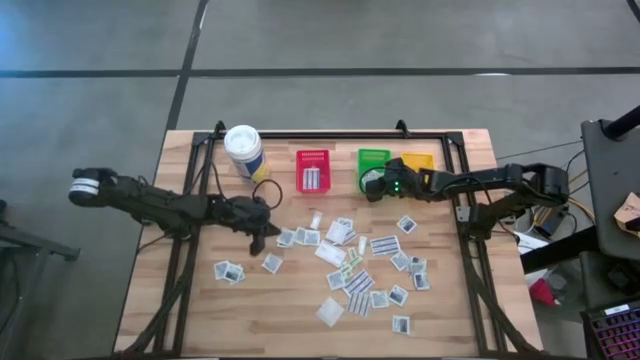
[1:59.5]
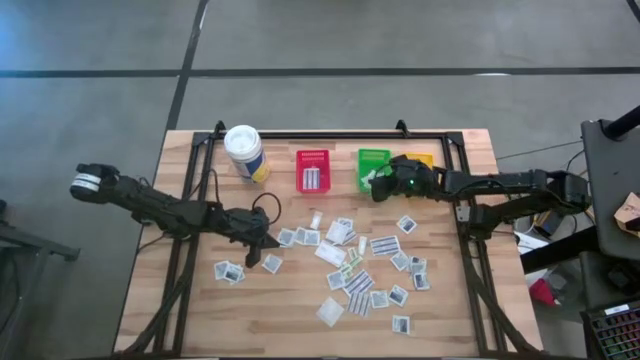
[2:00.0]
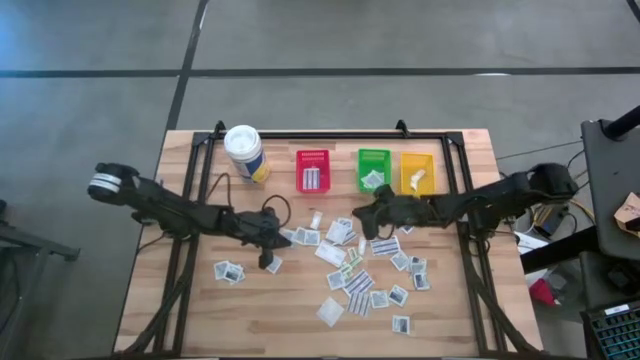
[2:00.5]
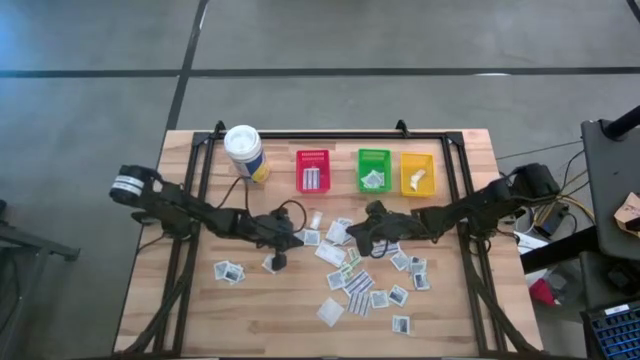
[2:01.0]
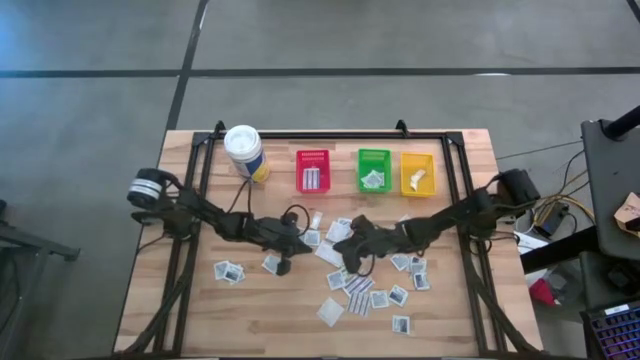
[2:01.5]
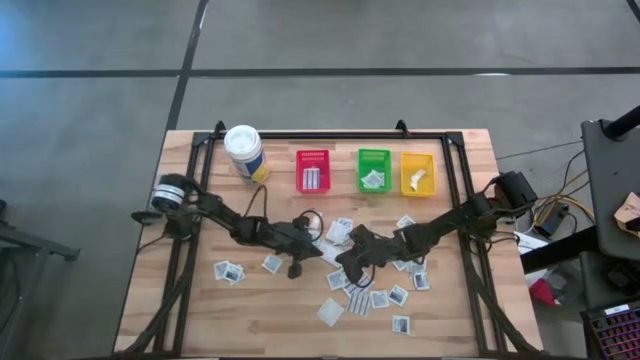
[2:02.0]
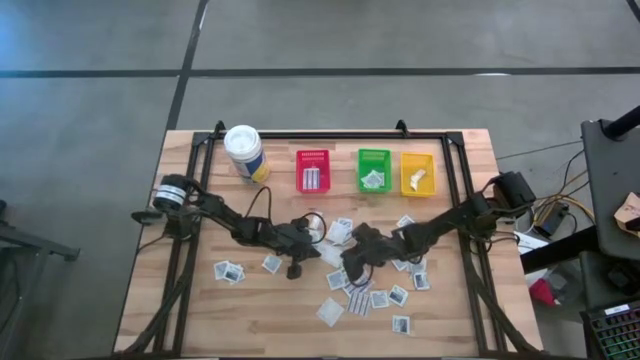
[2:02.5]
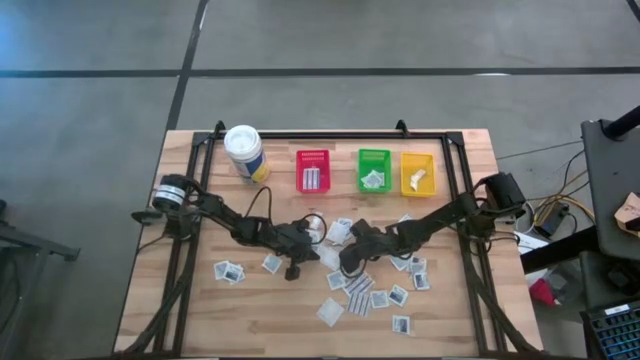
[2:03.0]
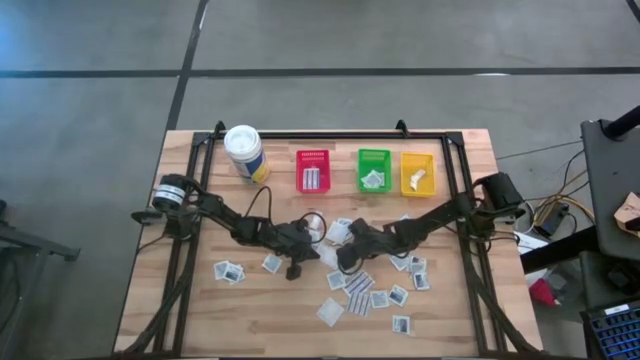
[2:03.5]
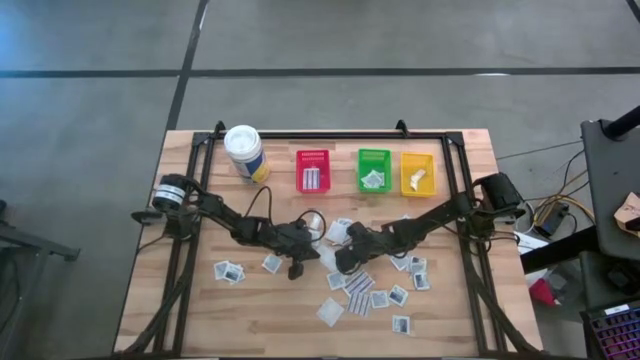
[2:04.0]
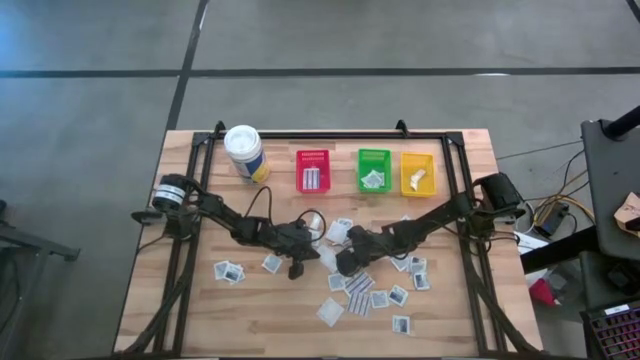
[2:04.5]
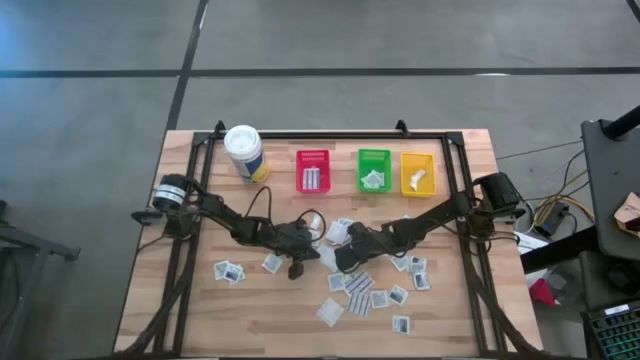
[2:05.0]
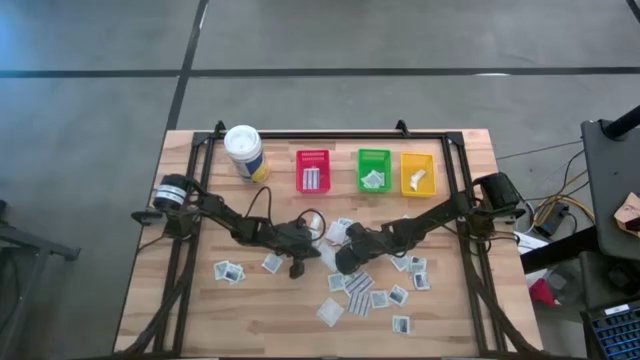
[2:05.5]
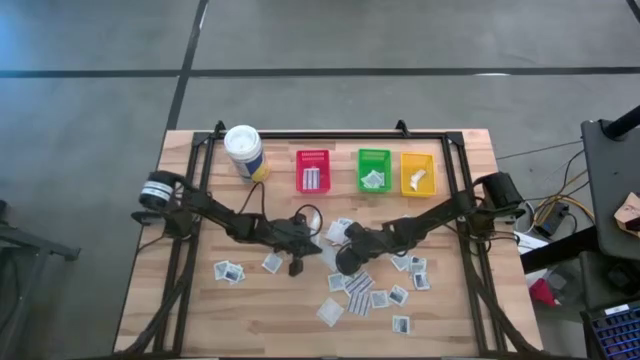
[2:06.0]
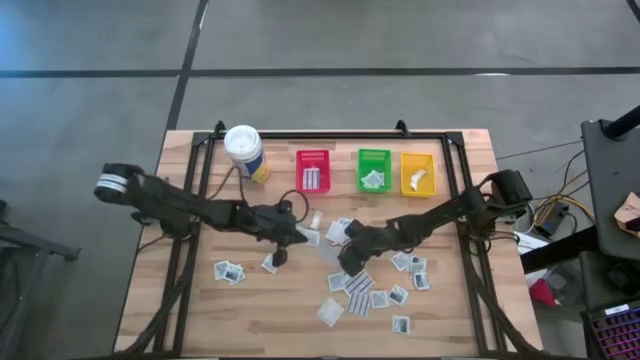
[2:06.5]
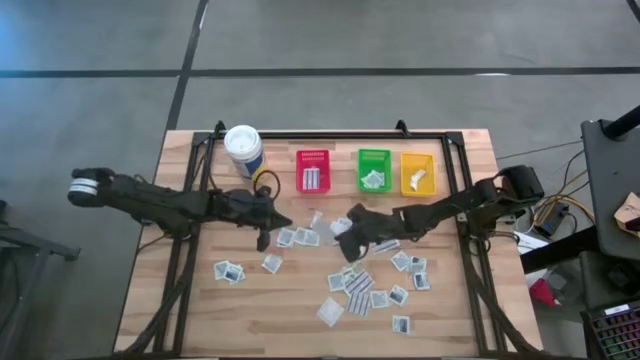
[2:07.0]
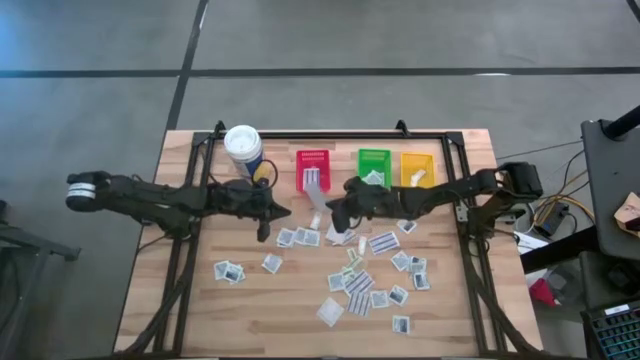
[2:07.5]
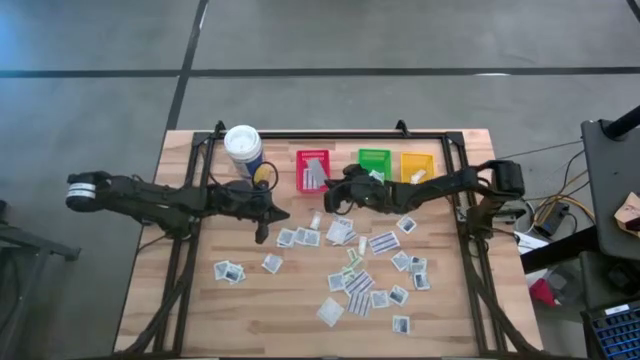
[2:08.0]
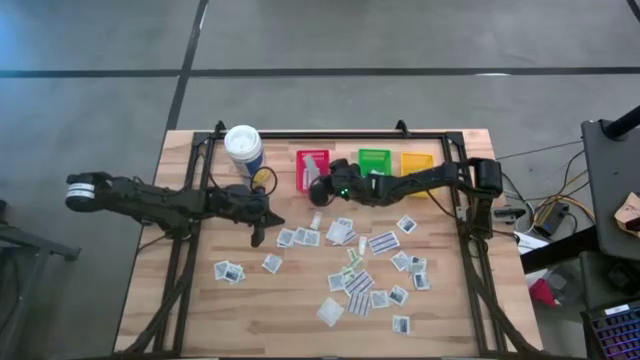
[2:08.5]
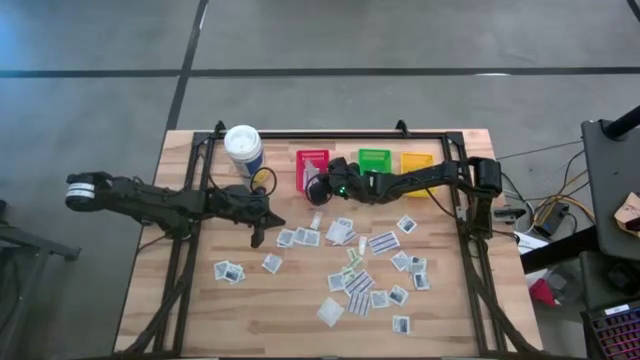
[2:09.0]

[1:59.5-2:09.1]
Task: Pick & Place First Aid Supplies
Put the blue bandage in the red bin

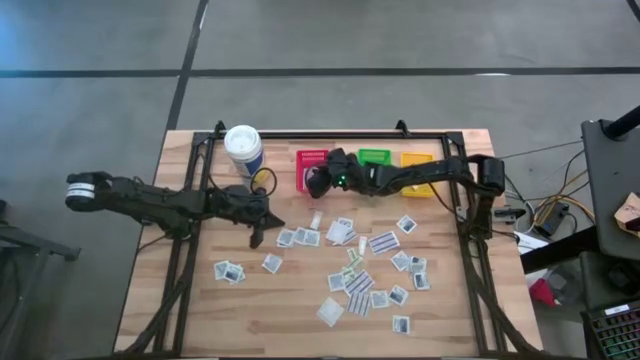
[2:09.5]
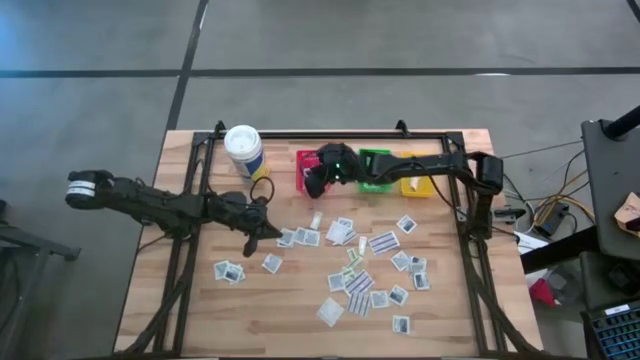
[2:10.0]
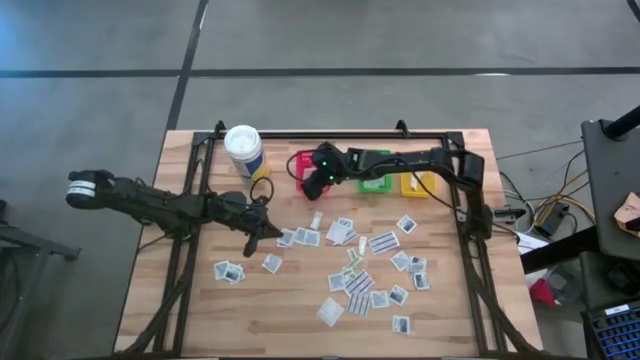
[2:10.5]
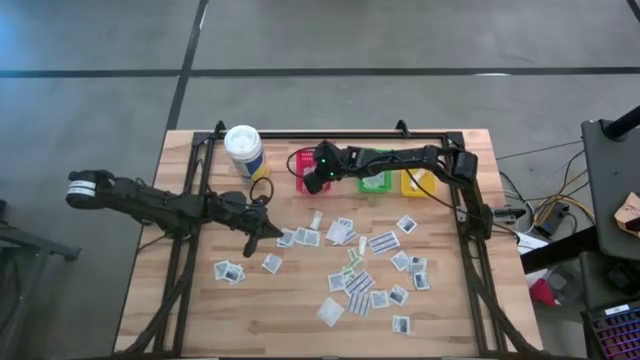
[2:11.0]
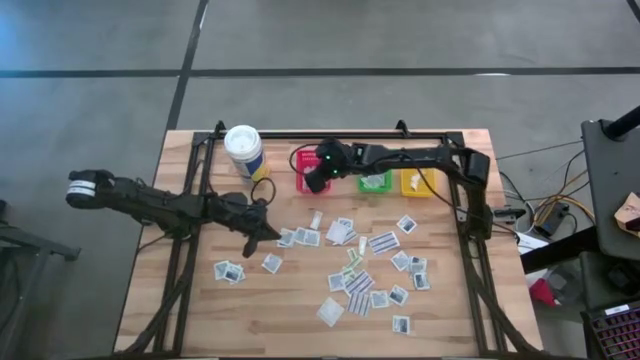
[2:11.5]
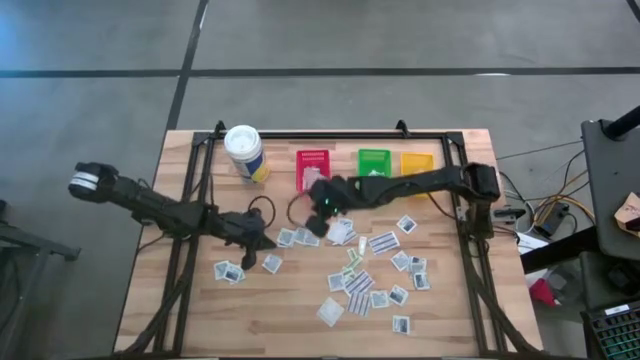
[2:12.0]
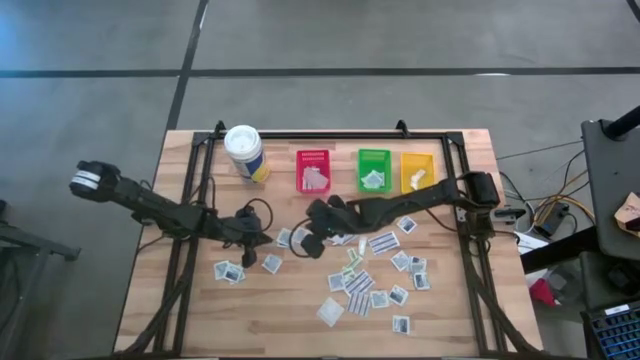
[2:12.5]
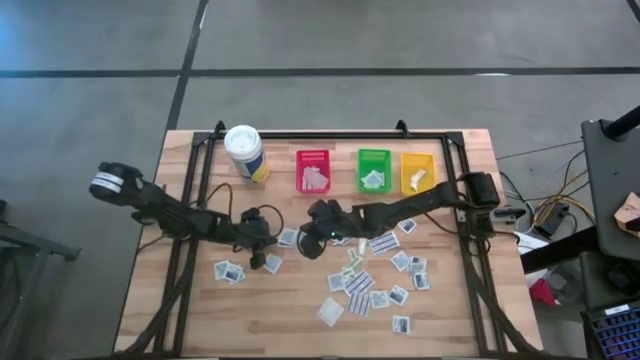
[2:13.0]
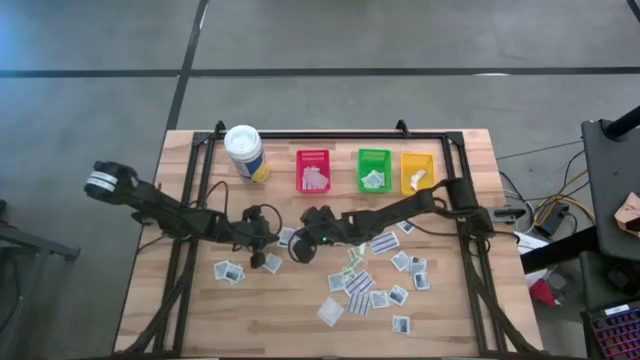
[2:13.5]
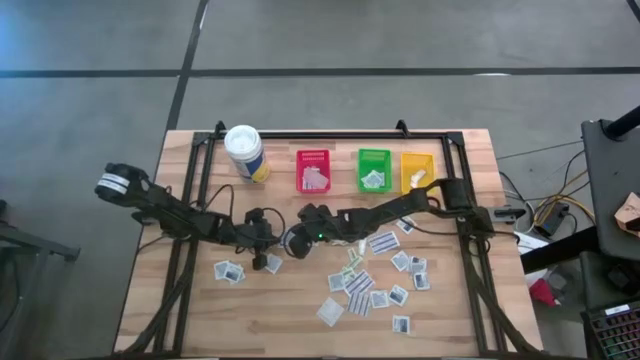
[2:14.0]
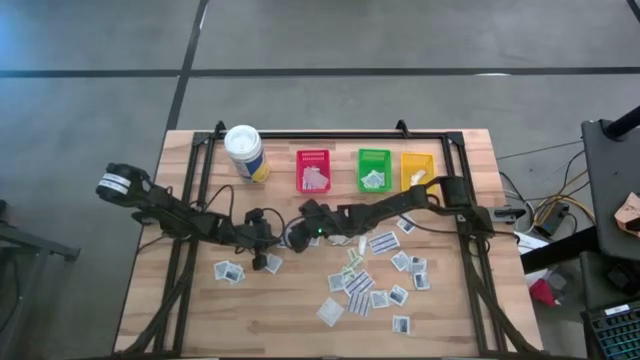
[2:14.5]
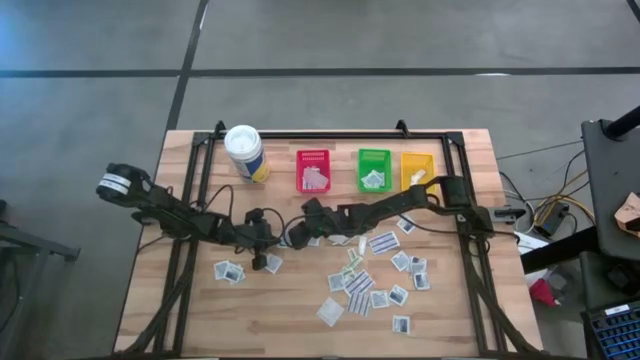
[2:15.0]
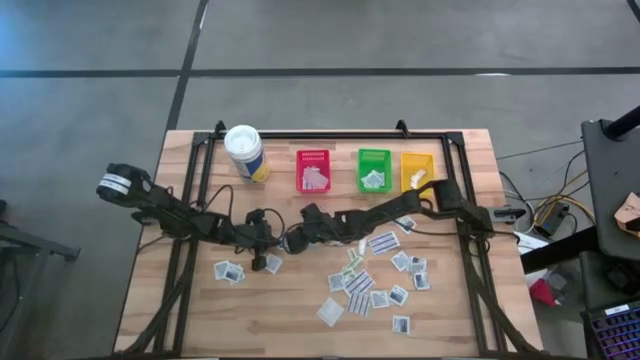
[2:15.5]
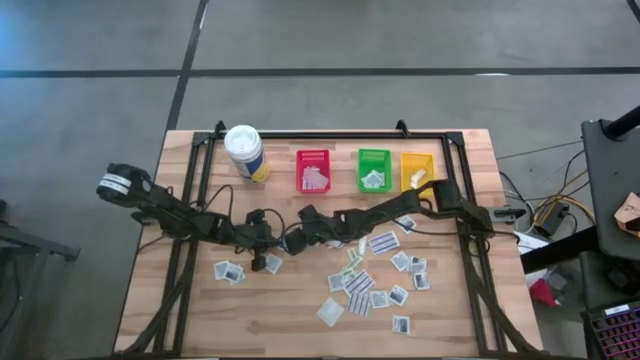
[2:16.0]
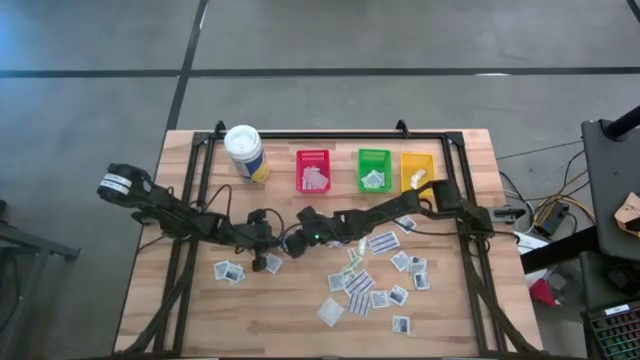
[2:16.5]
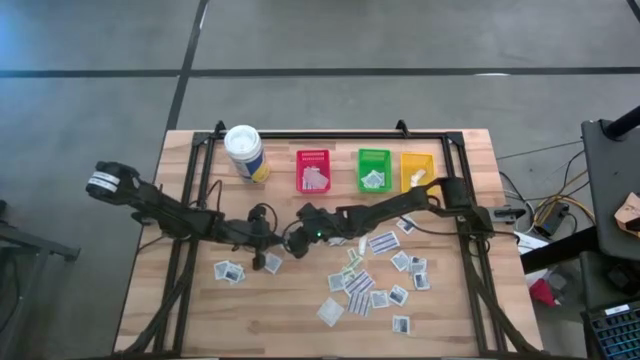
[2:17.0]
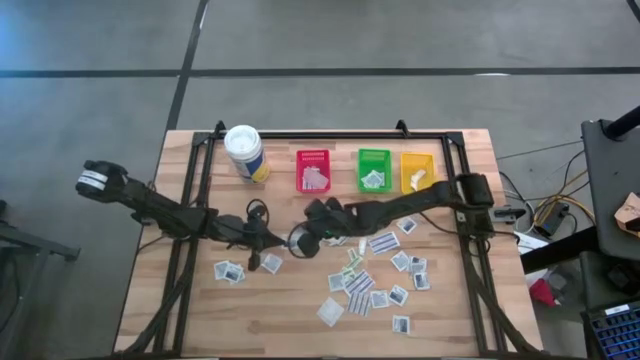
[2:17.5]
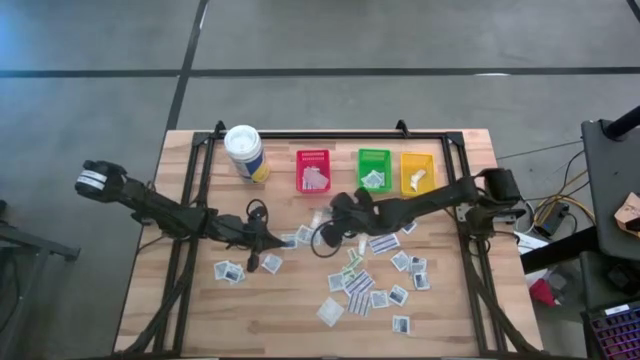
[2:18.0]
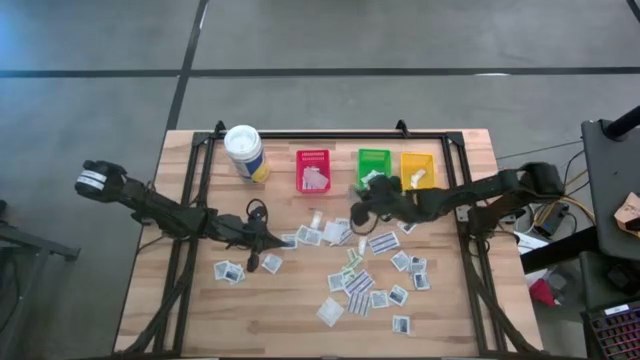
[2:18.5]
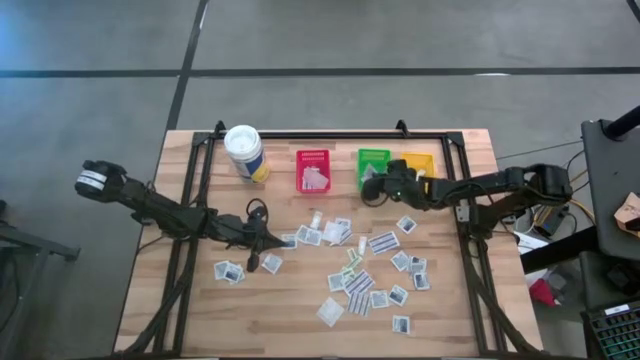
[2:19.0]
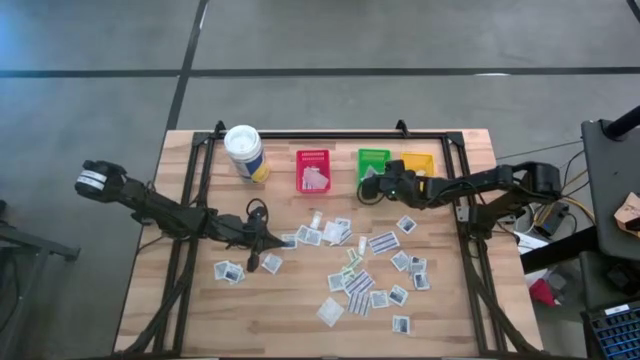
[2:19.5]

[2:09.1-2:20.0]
Put the alcohol pad in the green bin
